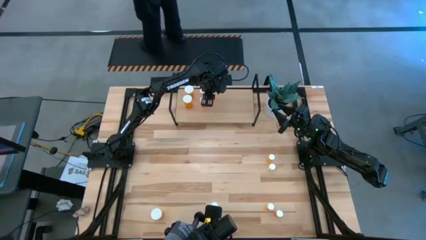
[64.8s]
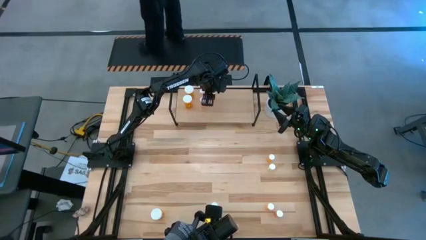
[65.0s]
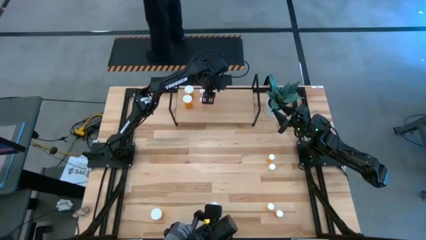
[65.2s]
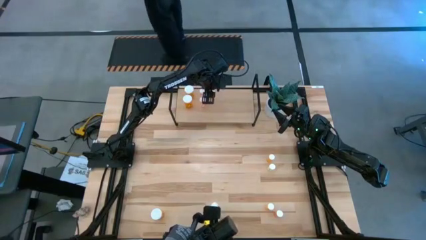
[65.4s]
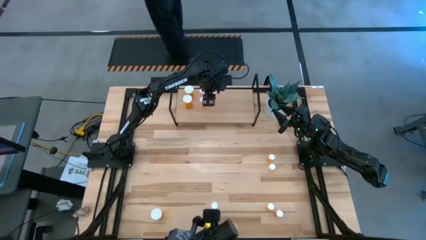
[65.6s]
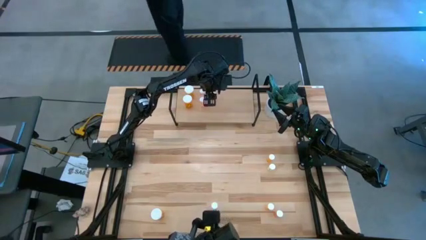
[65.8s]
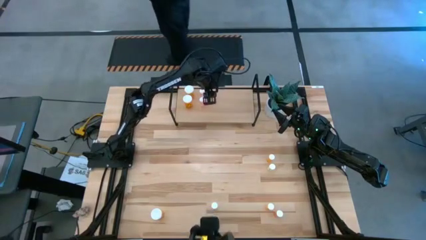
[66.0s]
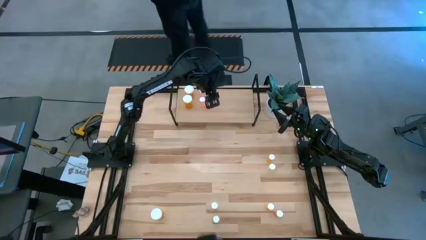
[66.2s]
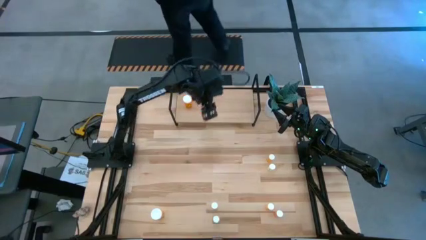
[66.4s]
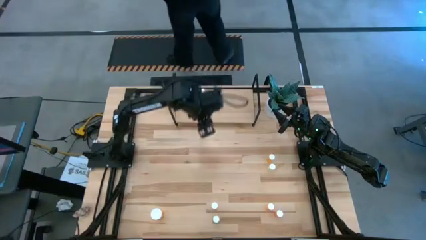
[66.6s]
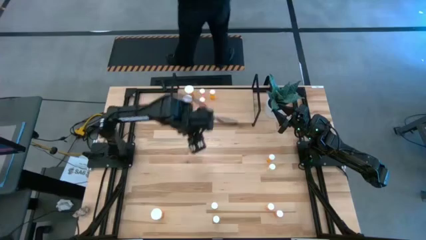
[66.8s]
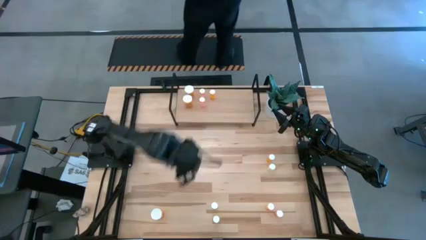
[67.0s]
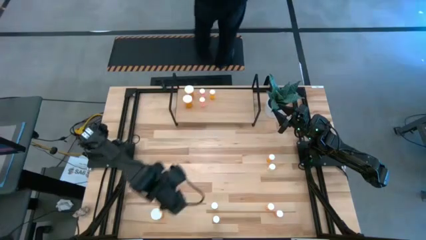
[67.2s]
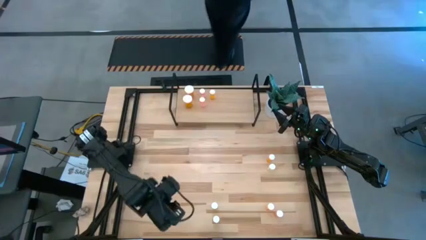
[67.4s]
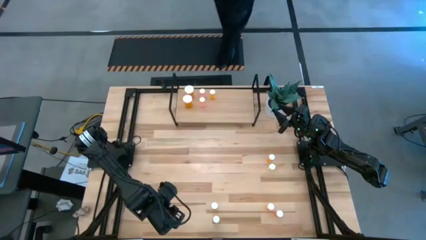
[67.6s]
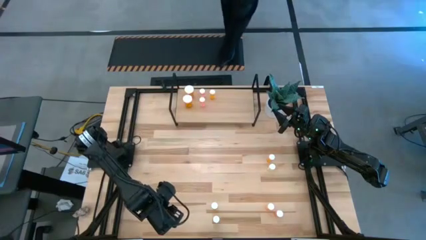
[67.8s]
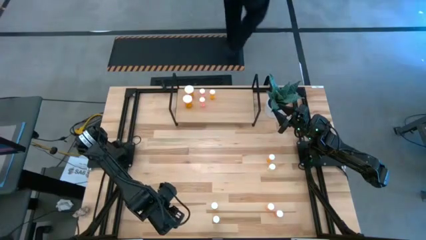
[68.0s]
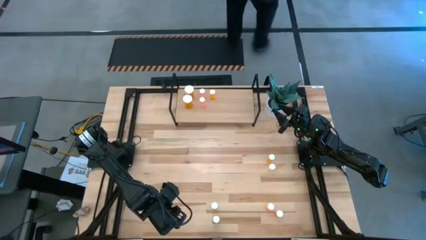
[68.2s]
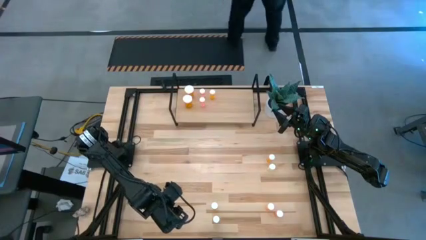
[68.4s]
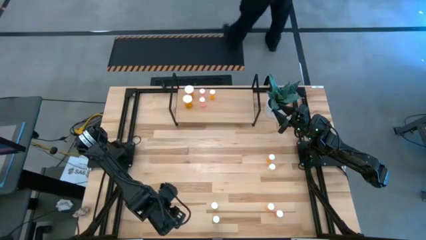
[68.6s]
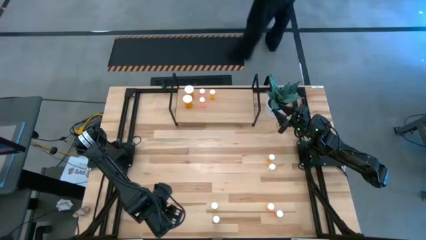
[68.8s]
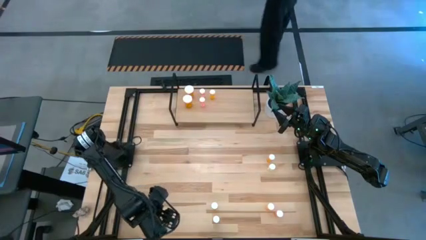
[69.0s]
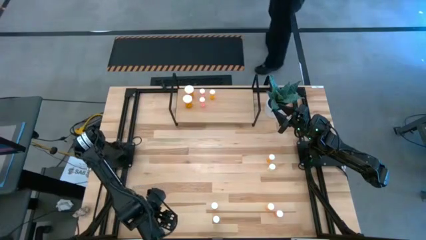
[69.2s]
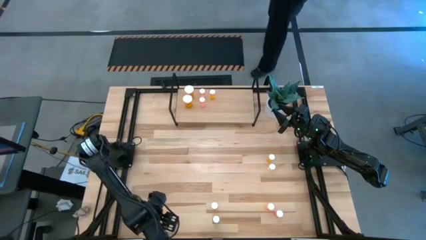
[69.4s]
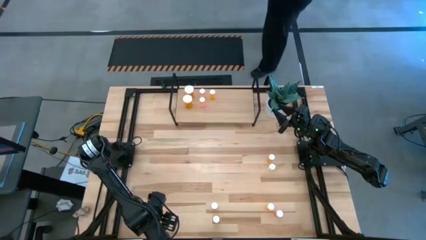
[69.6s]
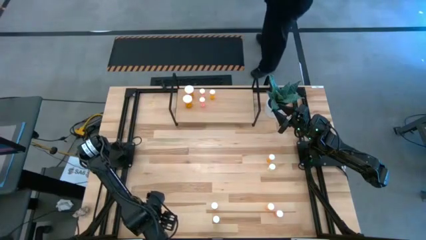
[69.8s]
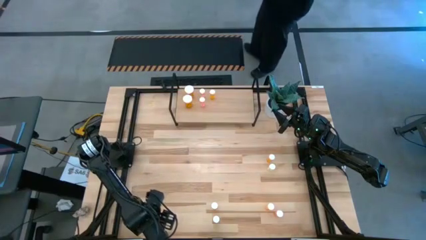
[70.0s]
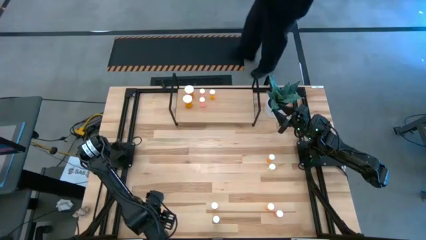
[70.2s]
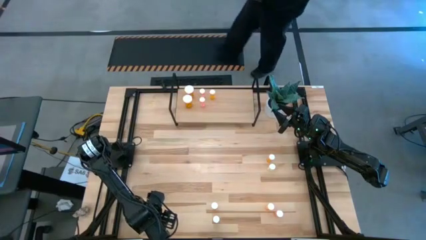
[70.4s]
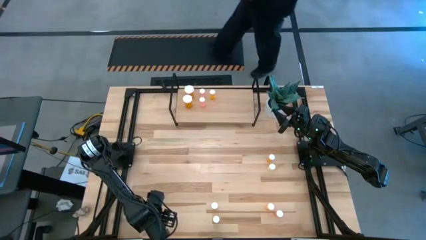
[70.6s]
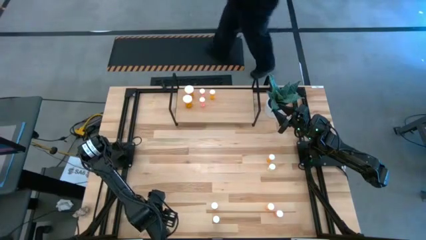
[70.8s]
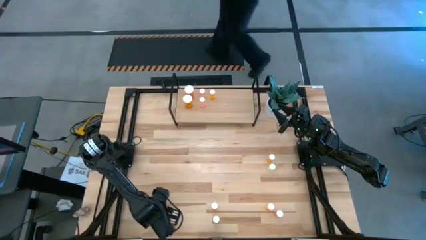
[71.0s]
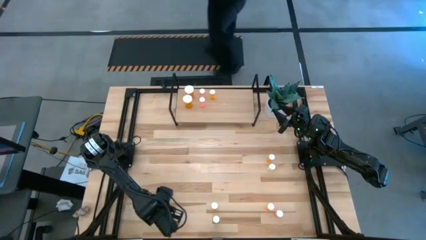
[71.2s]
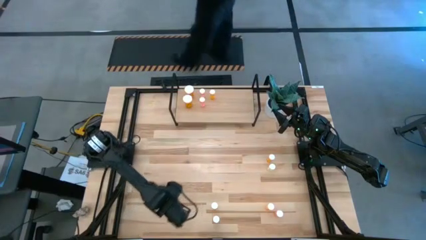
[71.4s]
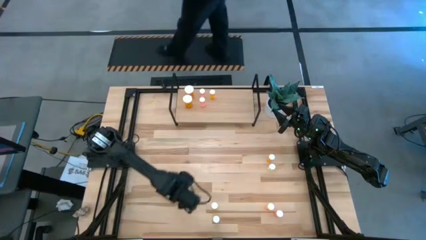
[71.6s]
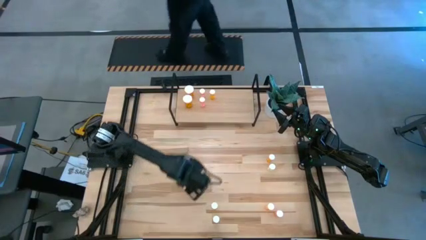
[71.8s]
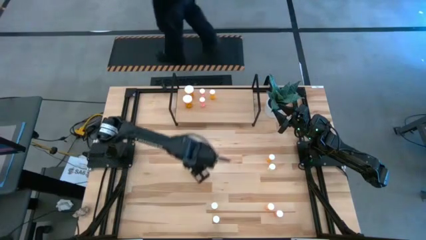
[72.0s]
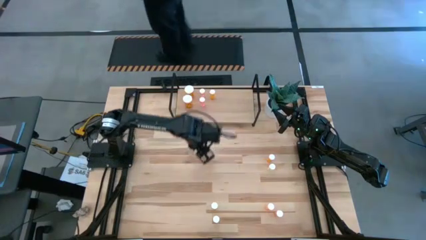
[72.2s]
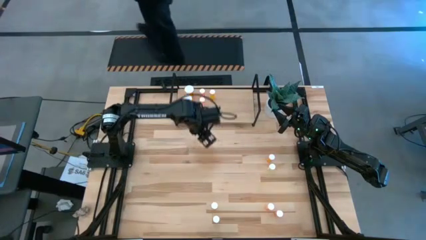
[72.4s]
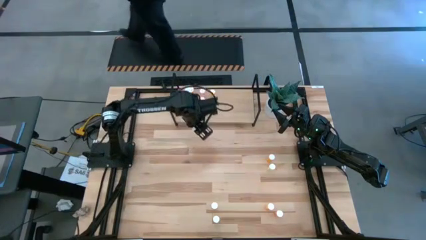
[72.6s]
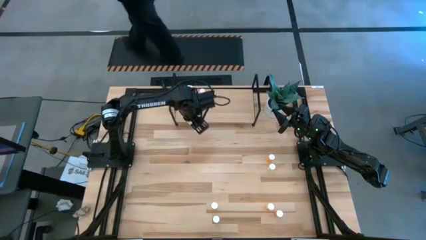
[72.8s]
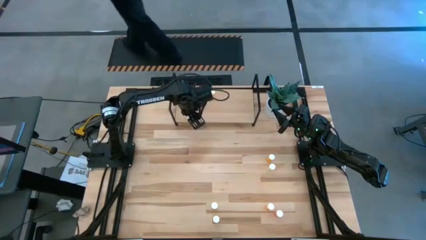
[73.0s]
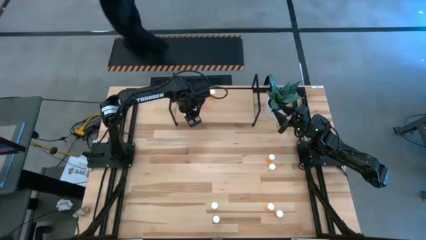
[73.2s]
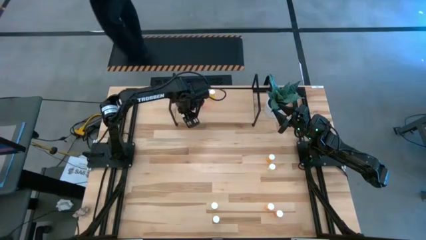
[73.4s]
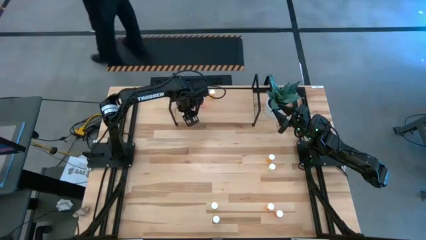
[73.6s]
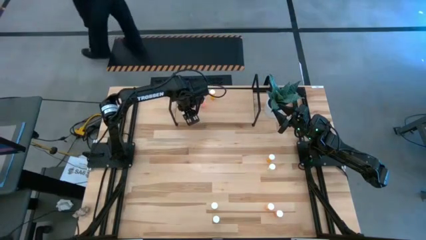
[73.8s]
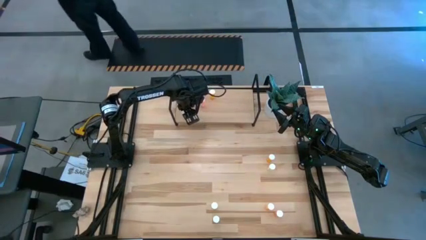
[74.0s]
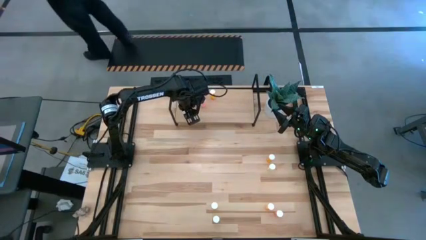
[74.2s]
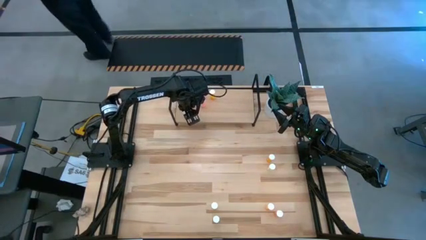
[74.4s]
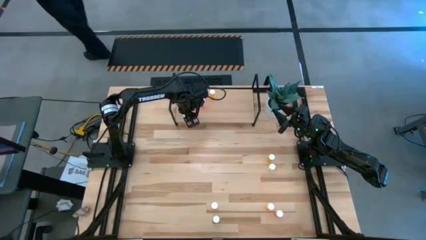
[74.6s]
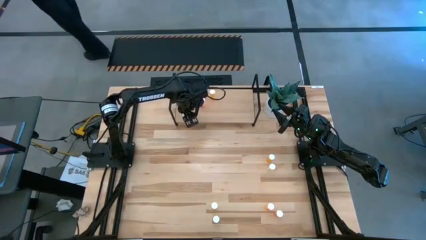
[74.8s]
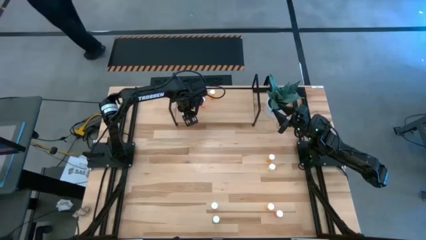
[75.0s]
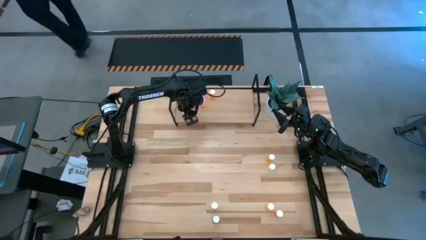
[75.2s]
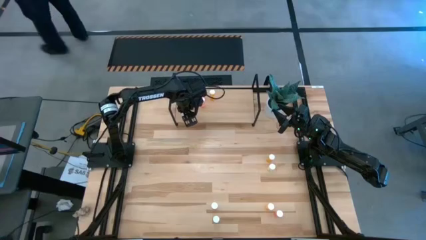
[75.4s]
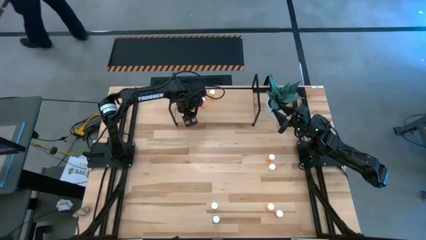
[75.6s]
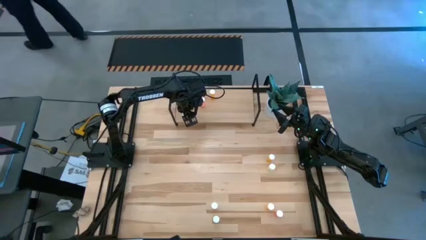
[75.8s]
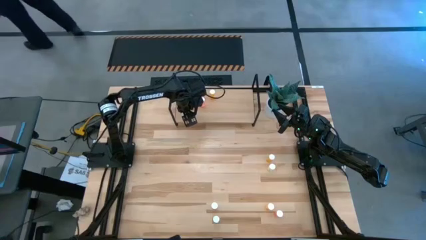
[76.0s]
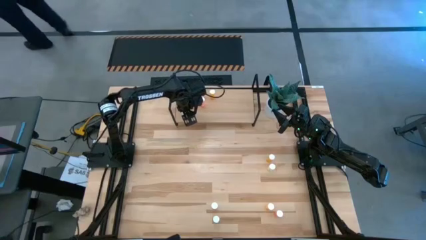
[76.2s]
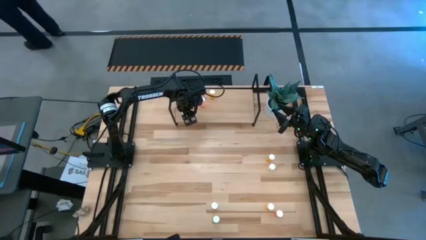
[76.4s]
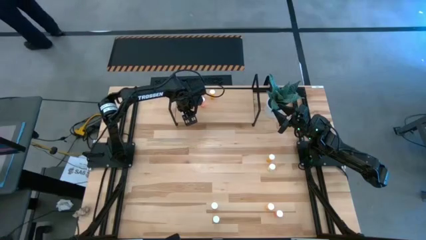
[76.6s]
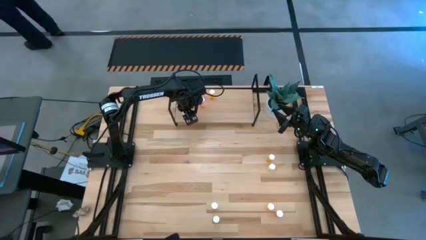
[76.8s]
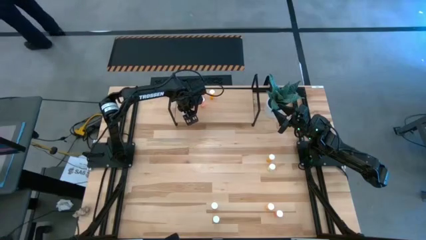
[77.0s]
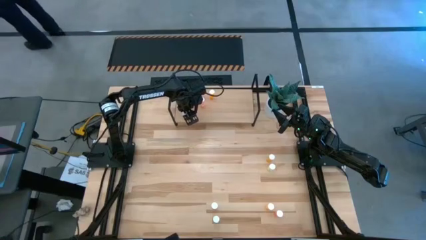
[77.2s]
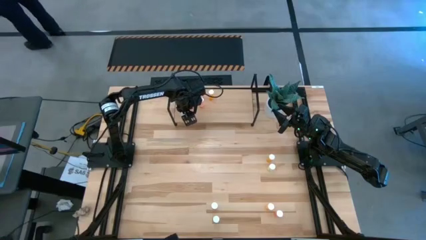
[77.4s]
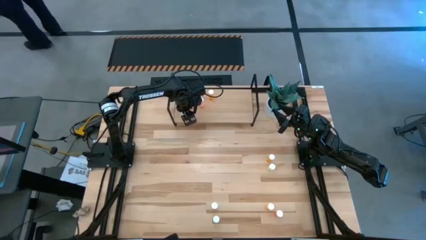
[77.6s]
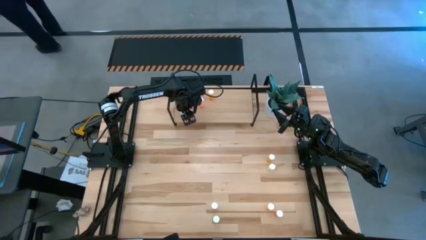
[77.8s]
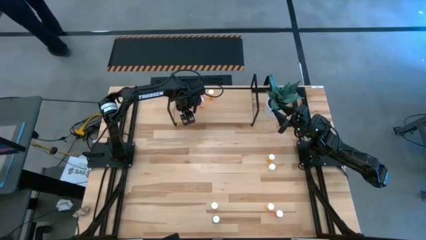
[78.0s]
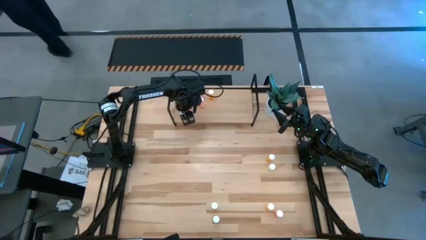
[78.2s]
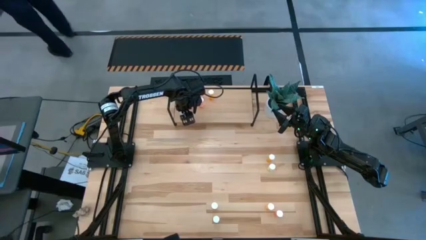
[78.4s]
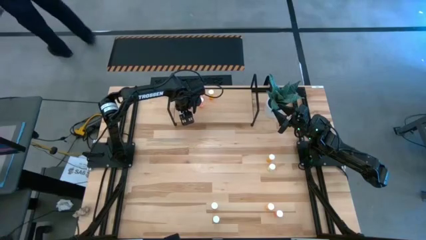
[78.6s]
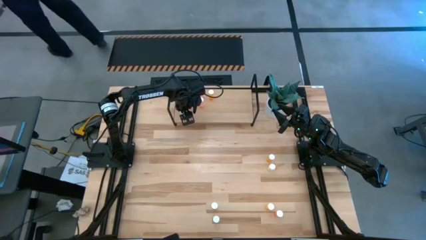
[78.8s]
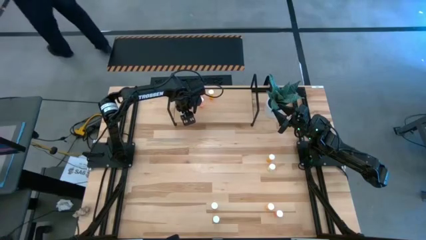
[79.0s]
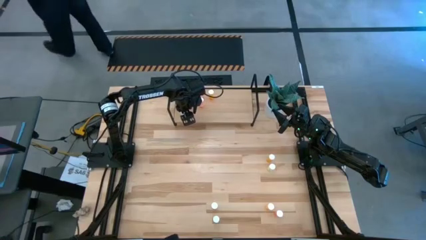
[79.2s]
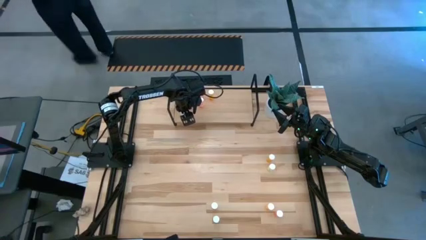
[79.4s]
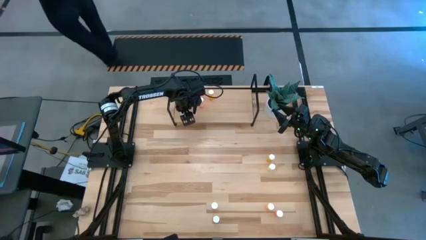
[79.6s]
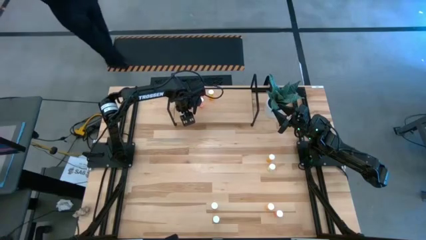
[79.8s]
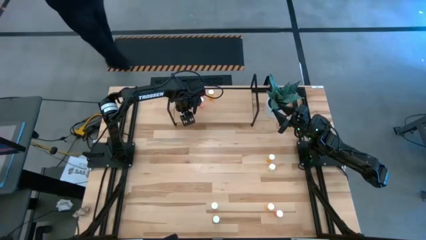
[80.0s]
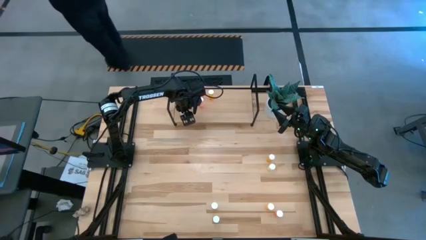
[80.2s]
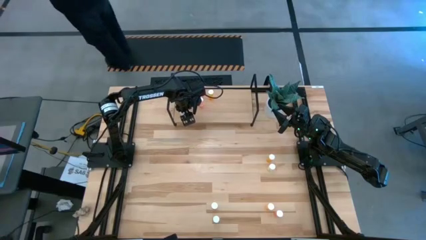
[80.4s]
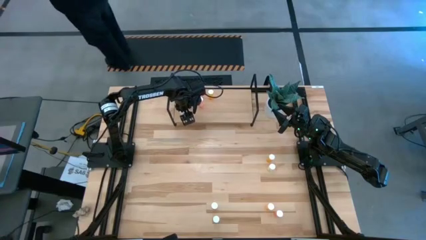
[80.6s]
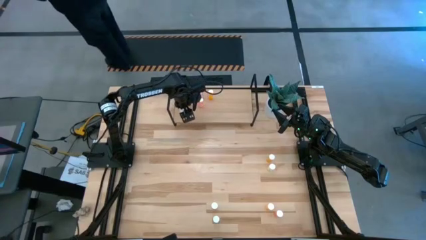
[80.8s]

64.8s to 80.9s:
Task: Pick and place medicine bottles onto shelf by color
Put the big orange pill bottle on the shelf aligned with the other big orange pill bottles
